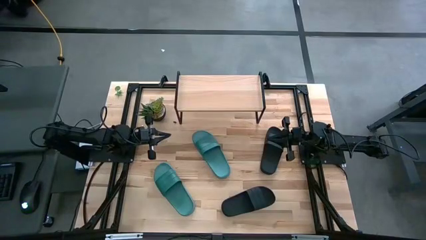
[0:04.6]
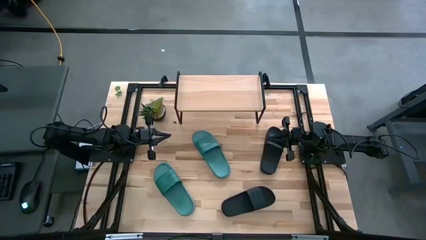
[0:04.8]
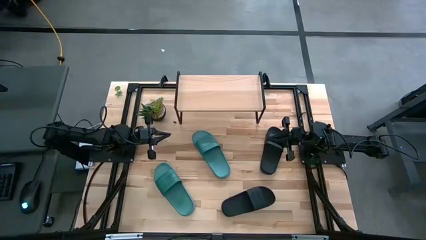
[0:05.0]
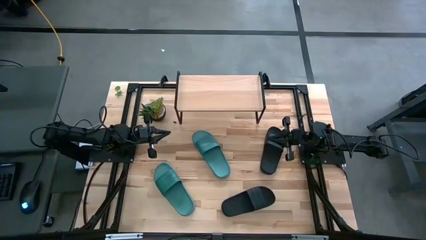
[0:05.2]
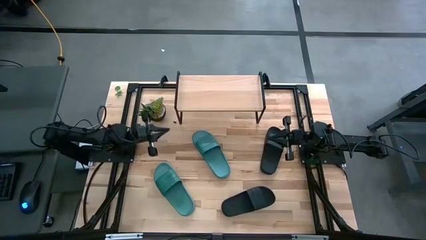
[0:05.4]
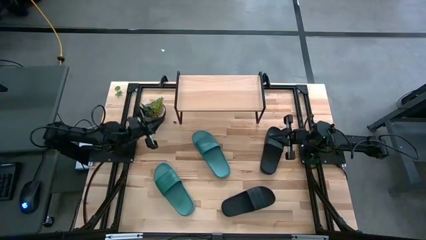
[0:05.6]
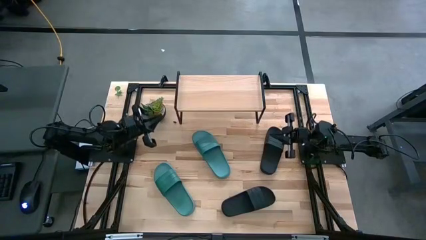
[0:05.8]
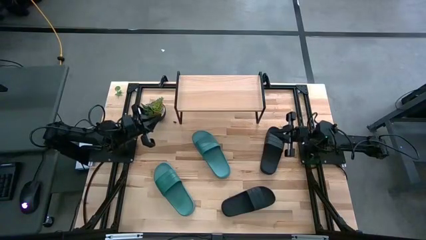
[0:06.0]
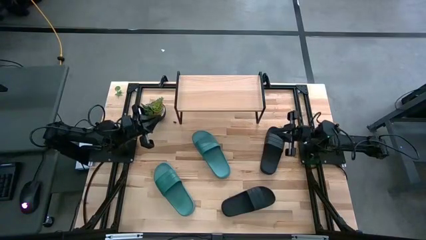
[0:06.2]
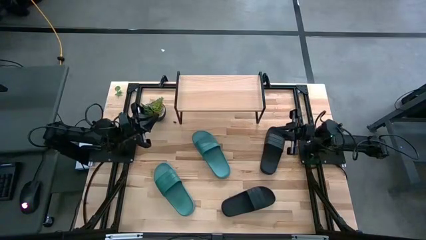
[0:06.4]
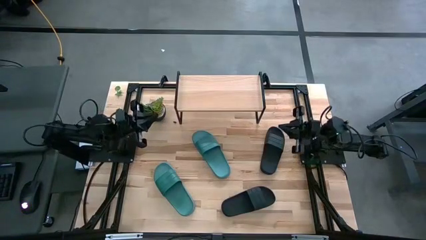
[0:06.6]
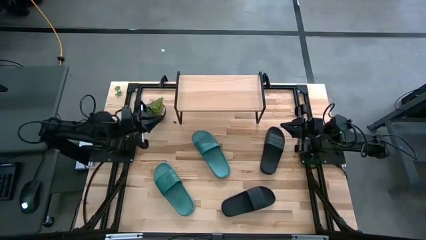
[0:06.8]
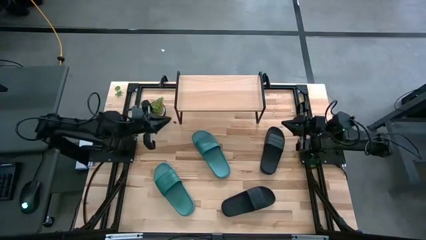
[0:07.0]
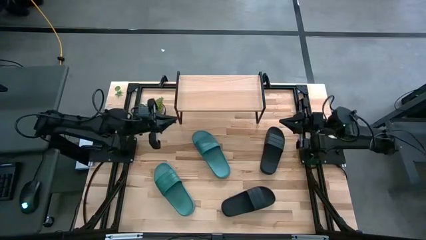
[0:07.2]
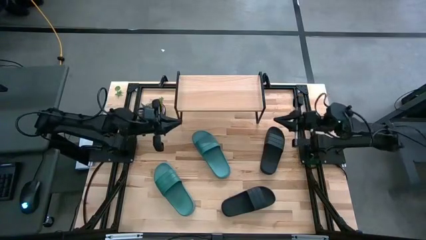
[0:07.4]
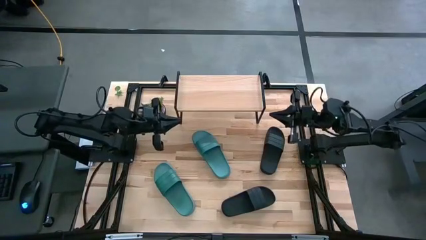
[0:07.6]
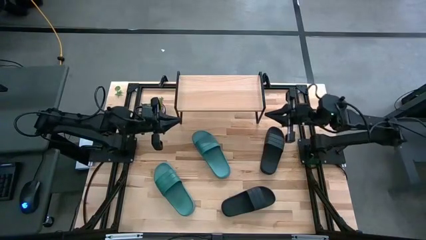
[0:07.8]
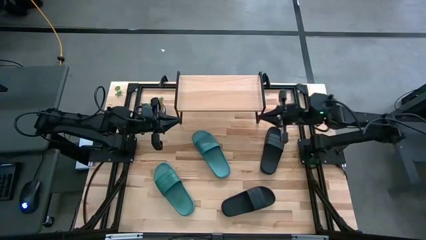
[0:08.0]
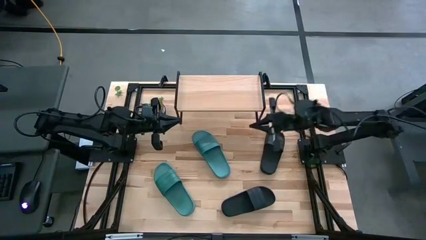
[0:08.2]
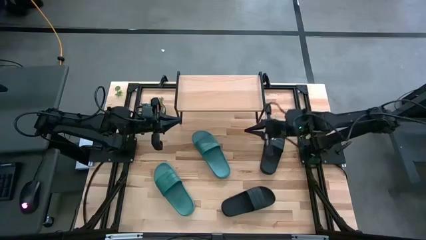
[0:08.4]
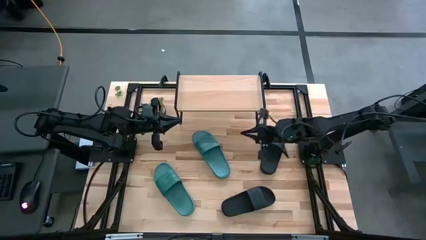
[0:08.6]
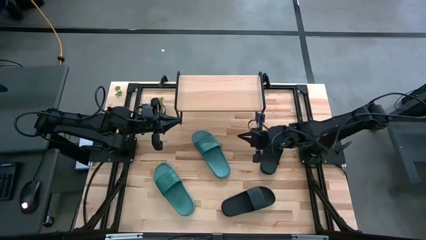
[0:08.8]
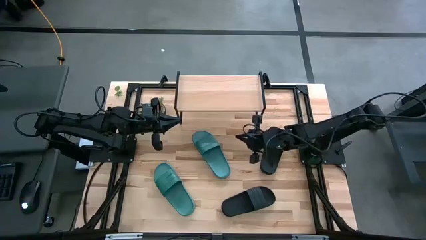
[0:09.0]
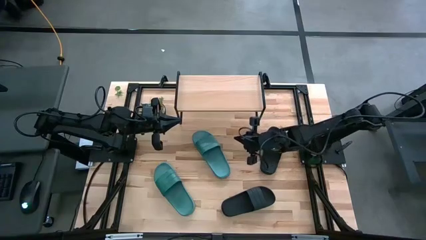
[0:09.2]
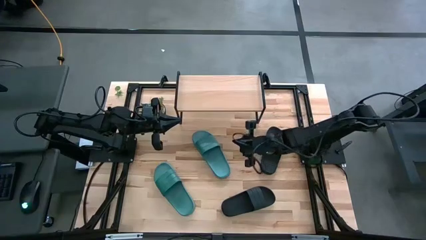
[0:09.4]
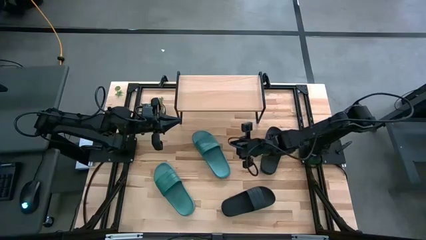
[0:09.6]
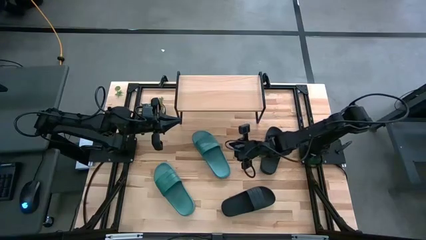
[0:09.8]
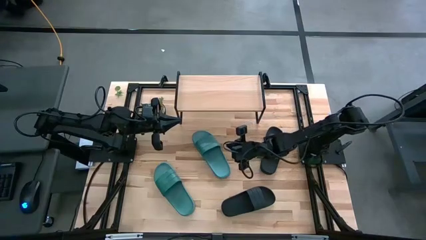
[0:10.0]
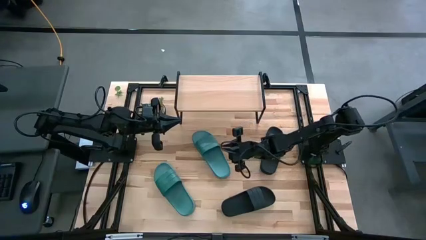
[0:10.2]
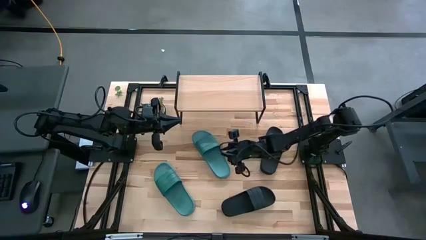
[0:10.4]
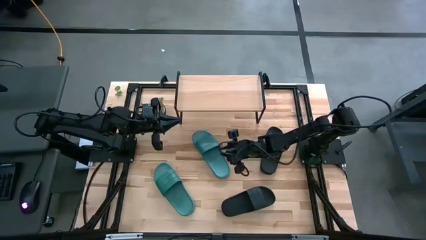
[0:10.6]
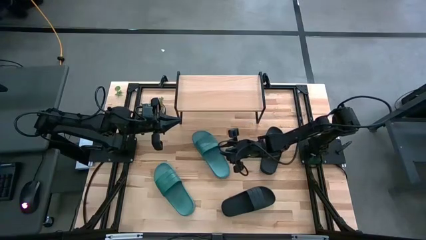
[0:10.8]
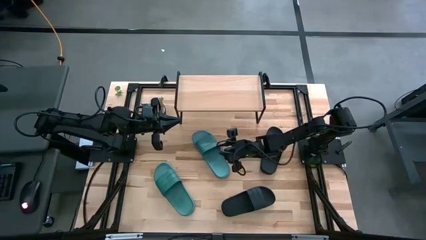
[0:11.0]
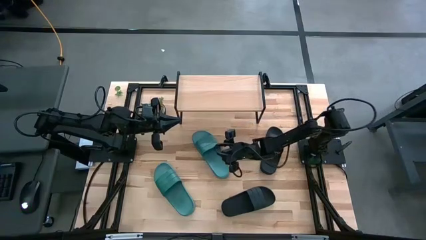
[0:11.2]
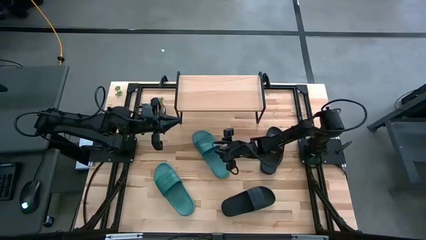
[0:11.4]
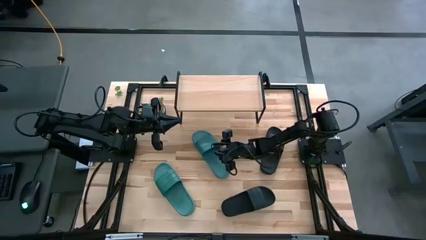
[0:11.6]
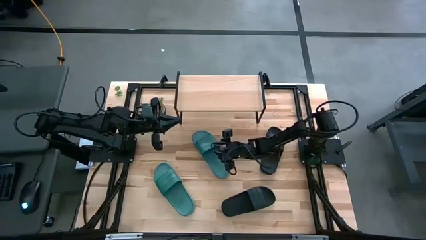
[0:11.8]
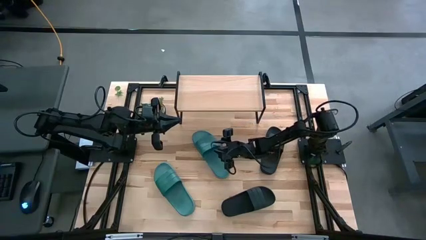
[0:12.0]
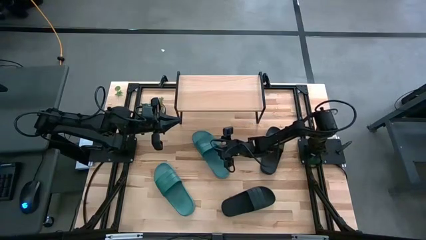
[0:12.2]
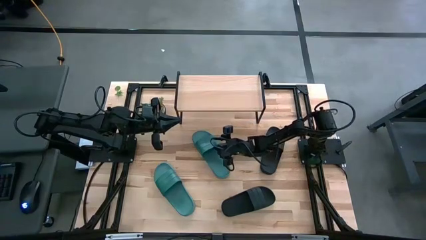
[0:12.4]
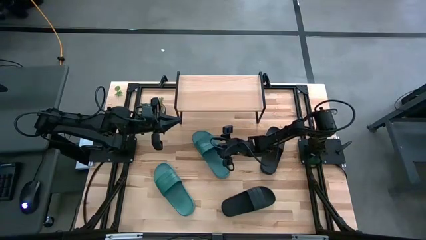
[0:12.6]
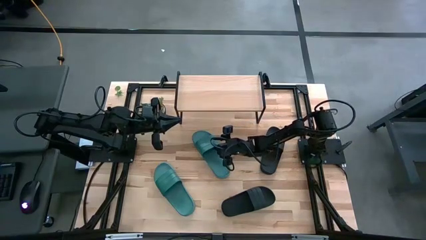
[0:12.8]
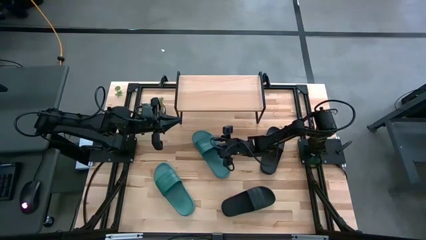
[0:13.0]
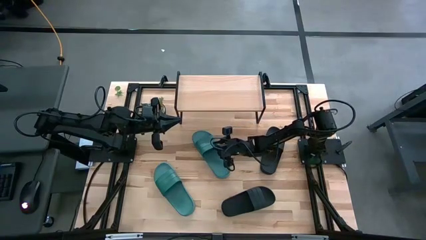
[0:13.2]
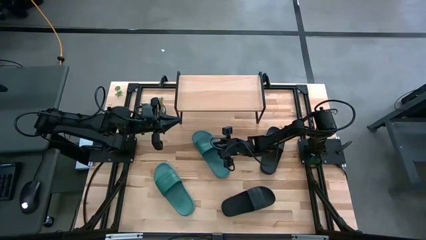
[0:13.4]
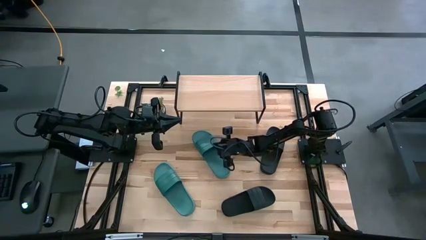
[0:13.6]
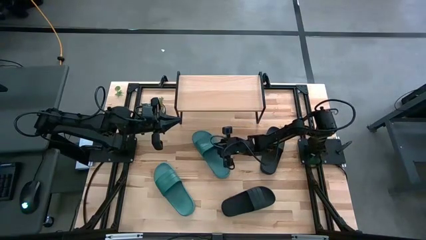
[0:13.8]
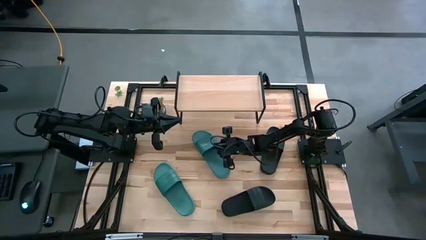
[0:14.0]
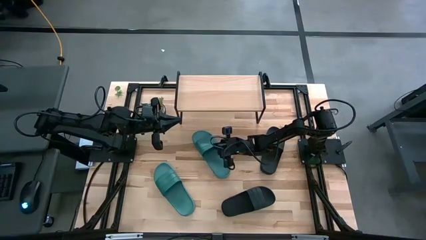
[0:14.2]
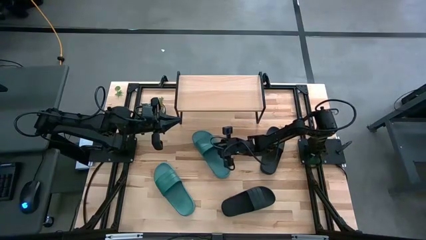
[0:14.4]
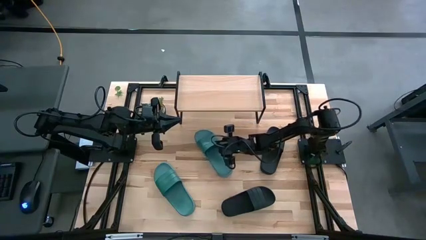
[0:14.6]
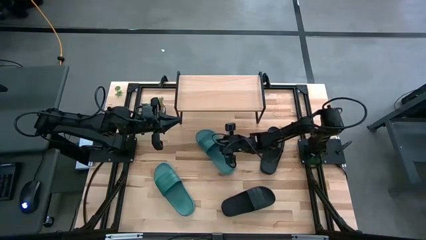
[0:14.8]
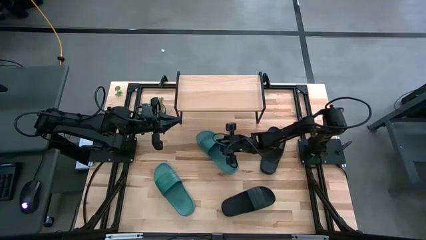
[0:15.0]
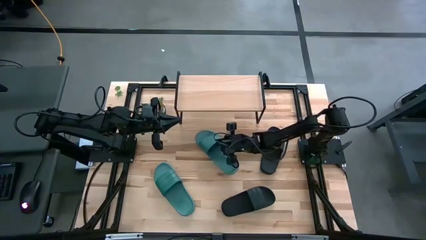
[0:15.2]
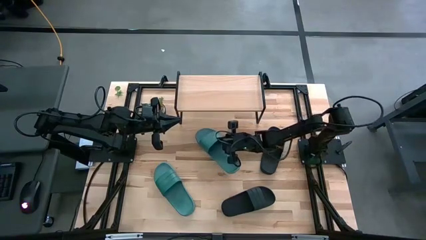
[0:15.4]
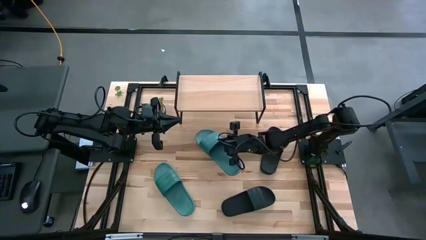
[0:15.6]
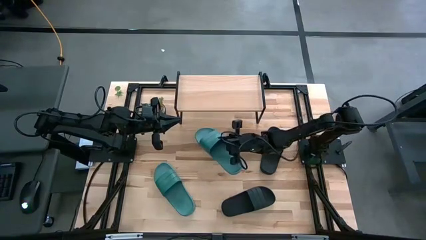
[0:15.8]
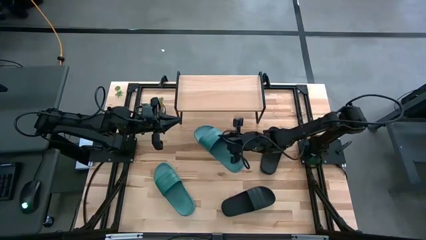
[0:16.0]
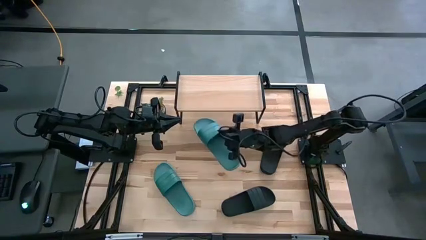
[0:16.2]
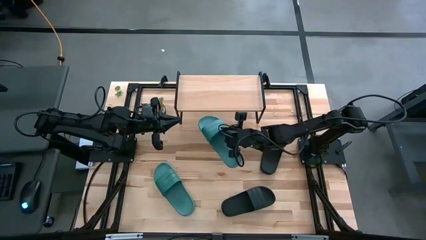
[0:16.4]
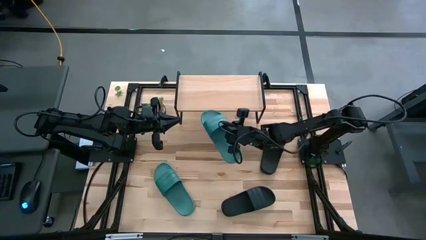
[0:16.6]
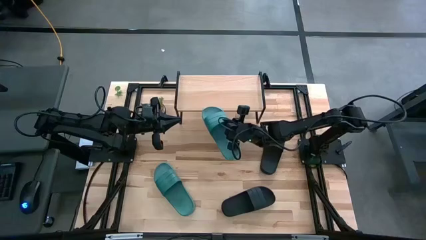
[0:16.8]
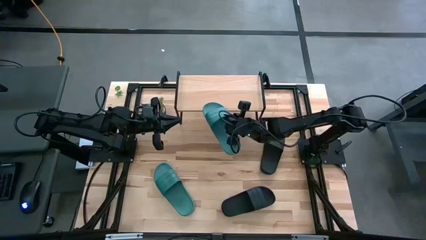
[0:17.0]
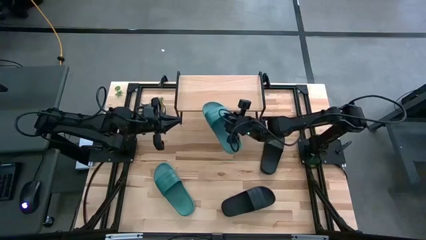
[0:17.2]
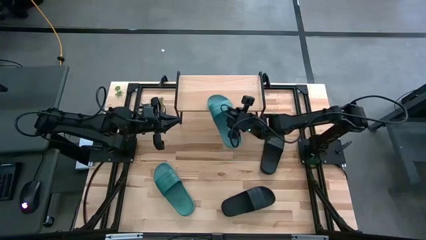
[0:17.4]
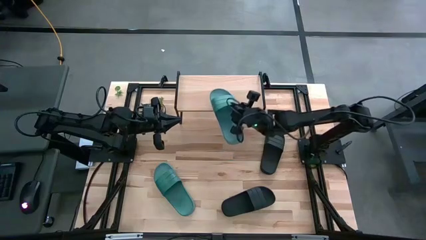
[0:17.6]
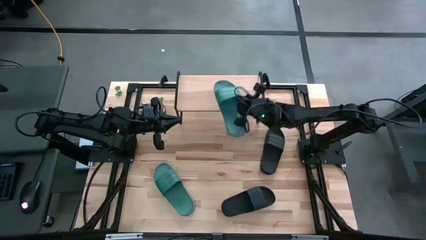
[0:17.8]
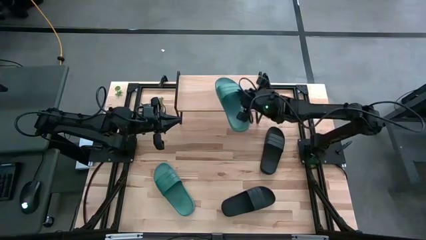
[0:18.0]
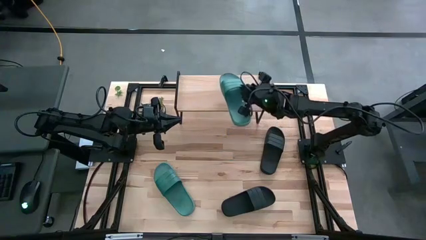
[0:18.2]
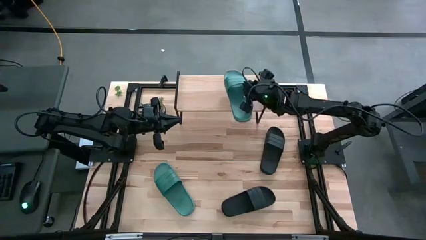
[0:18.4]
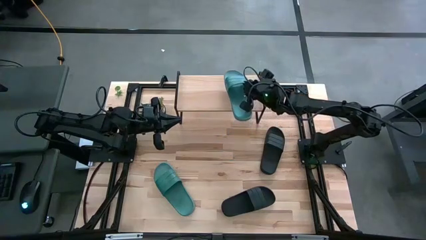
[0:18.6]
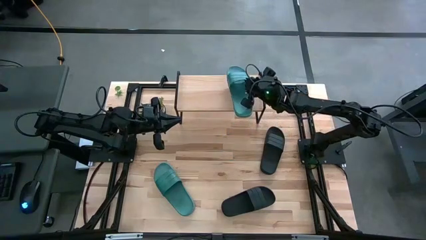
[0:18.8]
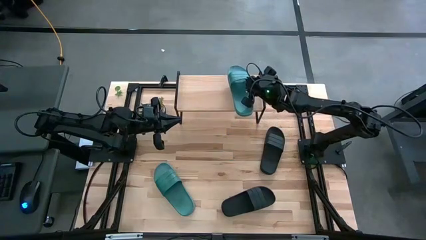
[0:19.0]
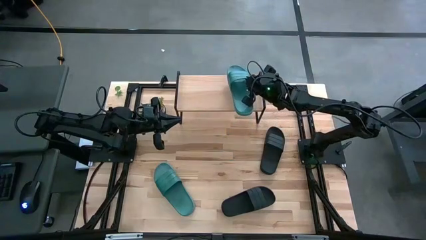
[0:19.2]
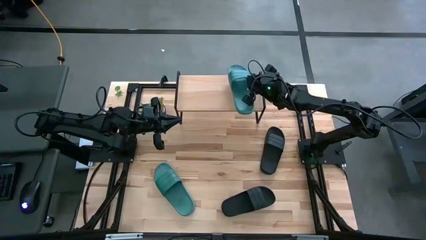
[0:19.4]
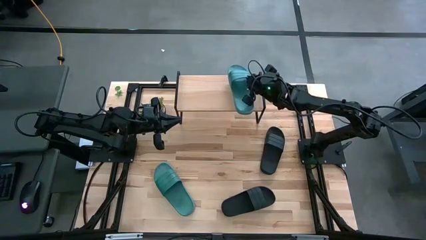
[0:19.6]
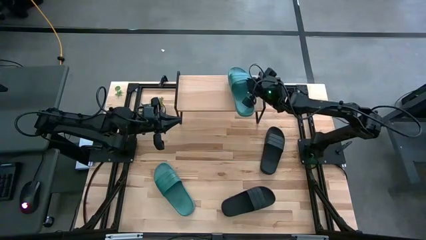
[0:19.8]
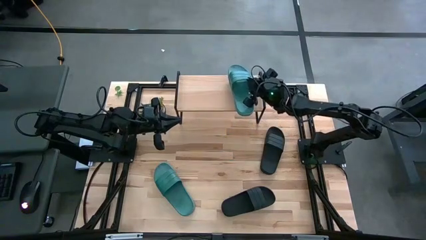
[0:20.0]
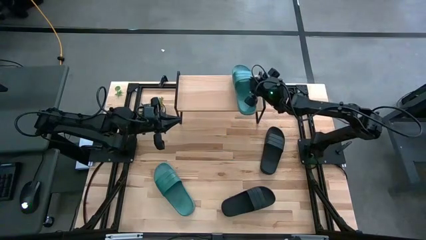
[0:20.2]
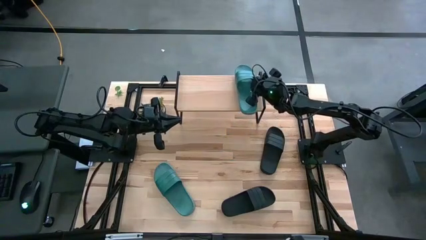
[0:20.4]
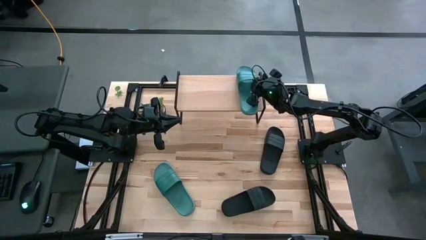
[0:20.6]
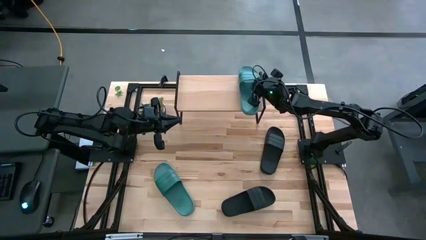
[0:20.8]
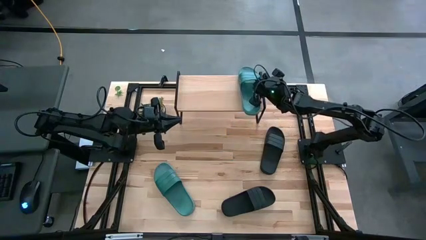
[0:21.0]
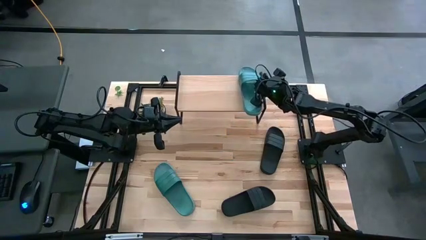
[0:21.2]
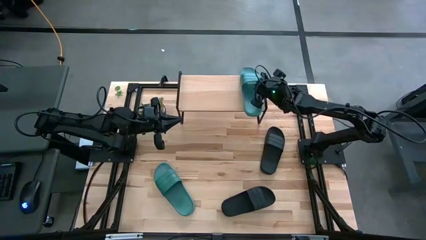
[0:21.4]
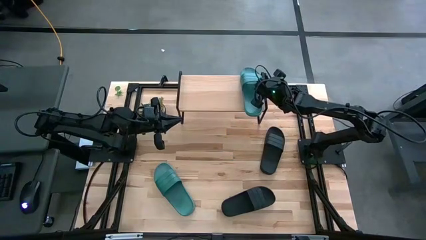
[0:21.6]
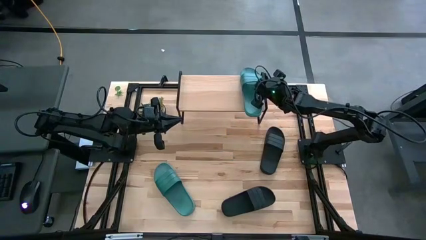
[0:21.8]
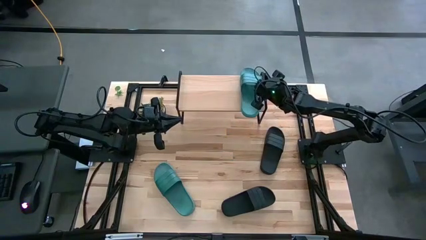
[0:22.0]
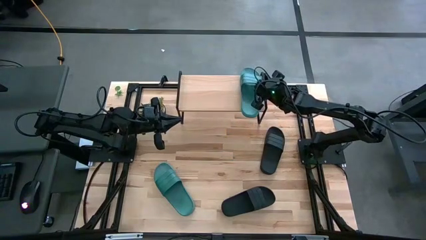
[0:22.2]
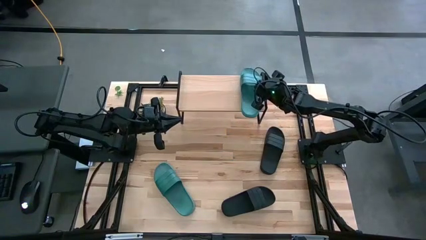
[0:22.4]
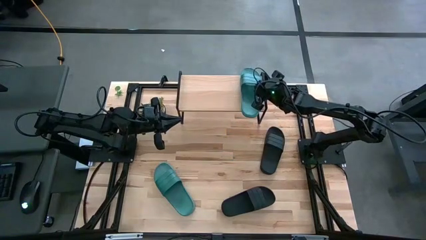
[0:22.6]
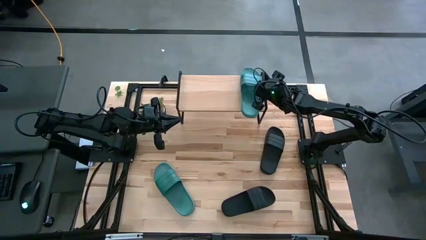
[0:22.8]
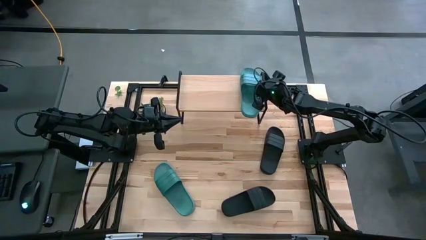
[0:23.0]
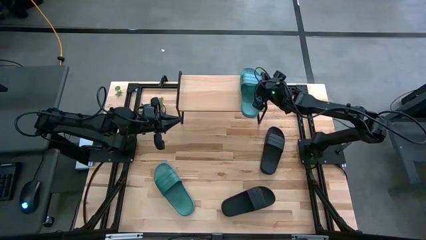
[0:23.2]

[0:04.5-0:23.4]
Task: Pick and place slides into the shelf
Put the top green slide on the shelf
